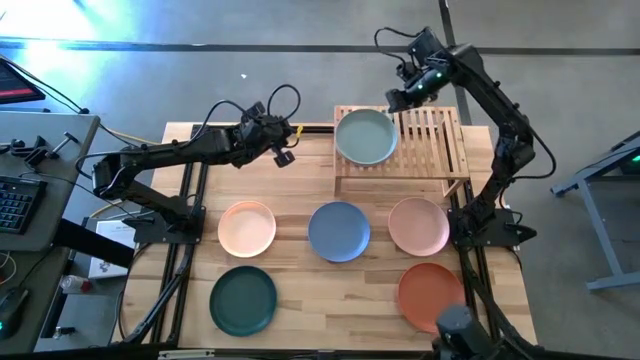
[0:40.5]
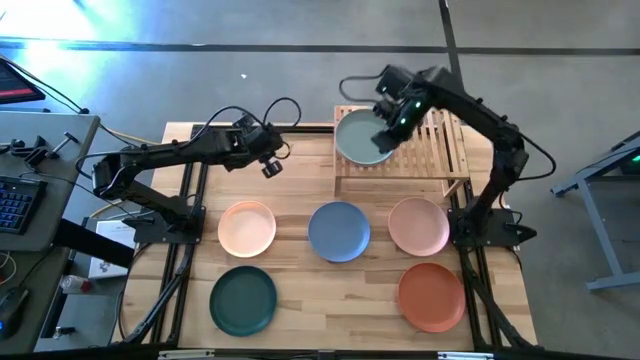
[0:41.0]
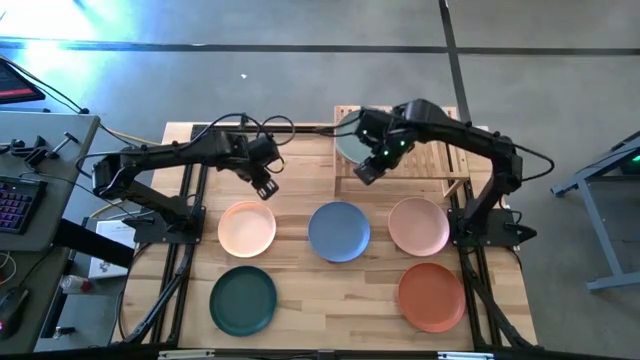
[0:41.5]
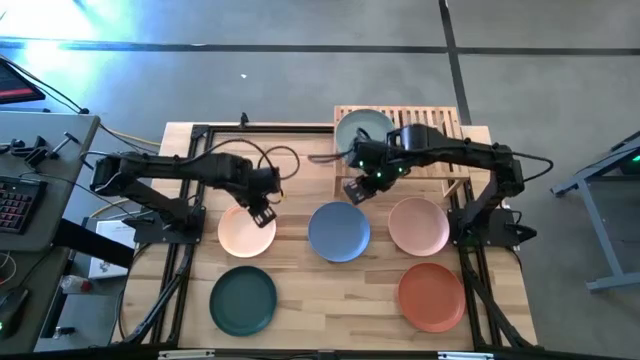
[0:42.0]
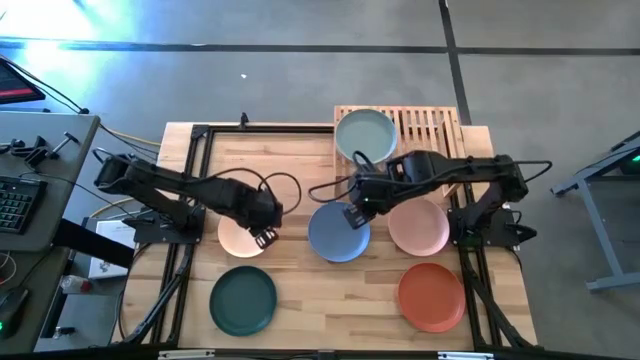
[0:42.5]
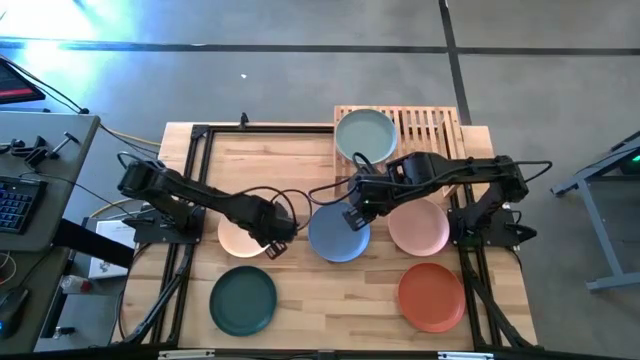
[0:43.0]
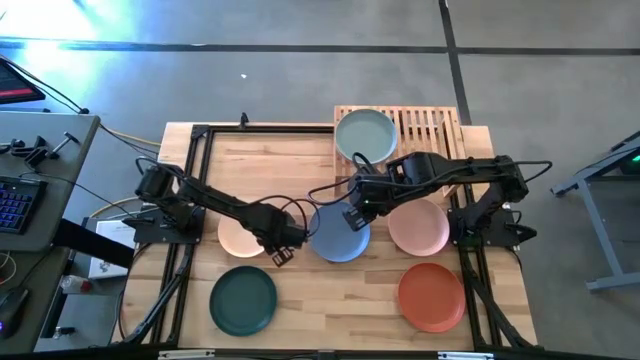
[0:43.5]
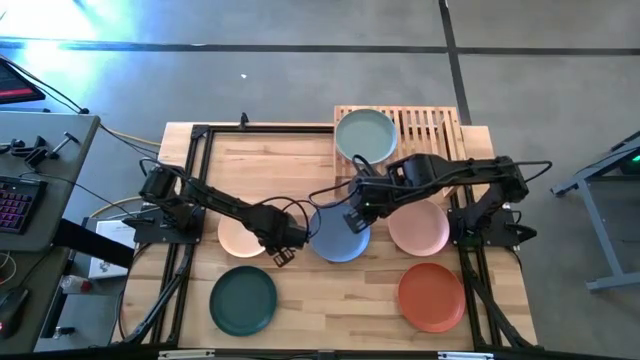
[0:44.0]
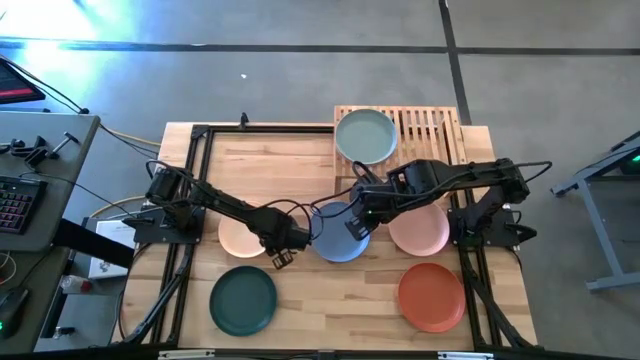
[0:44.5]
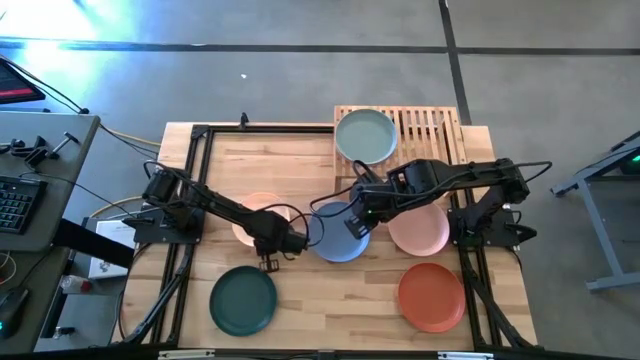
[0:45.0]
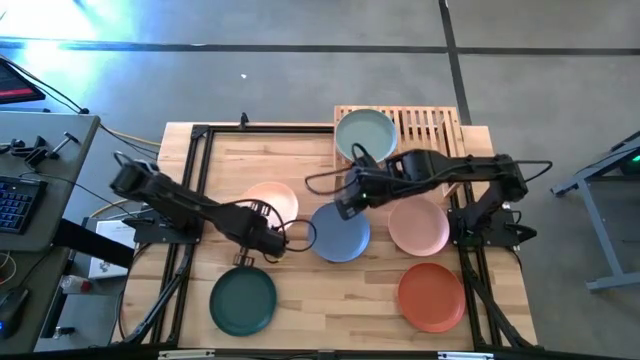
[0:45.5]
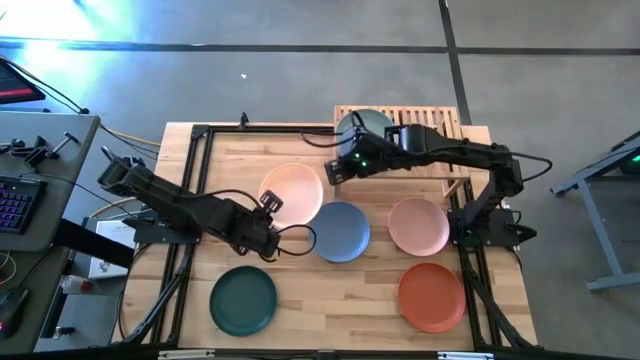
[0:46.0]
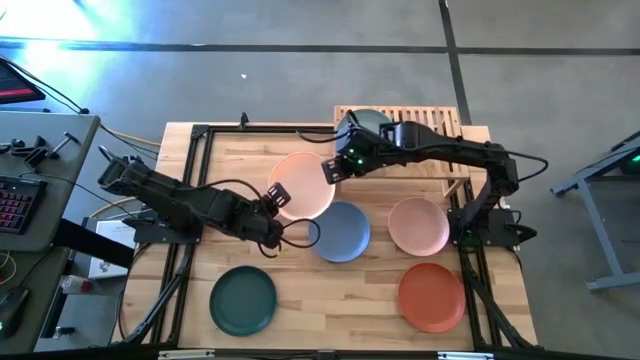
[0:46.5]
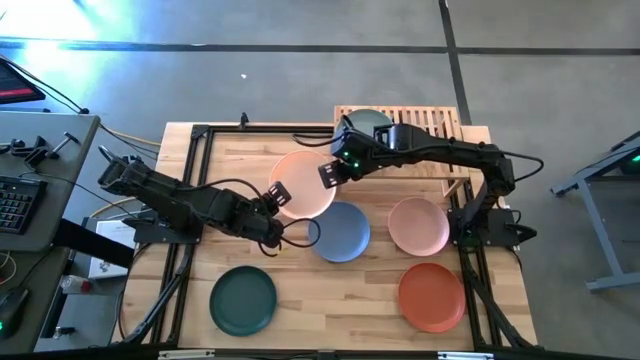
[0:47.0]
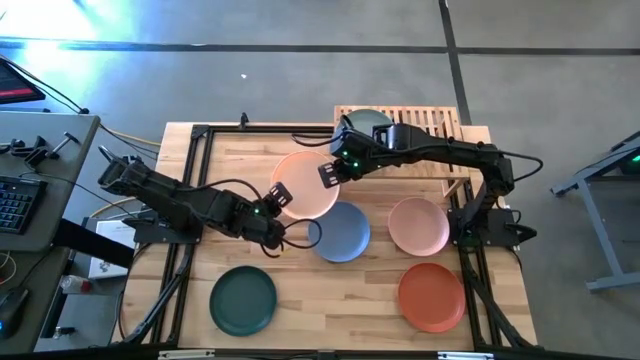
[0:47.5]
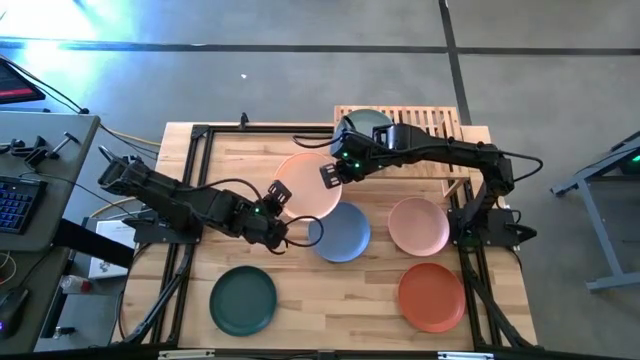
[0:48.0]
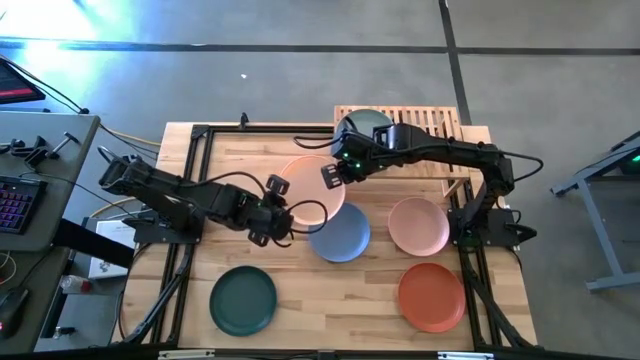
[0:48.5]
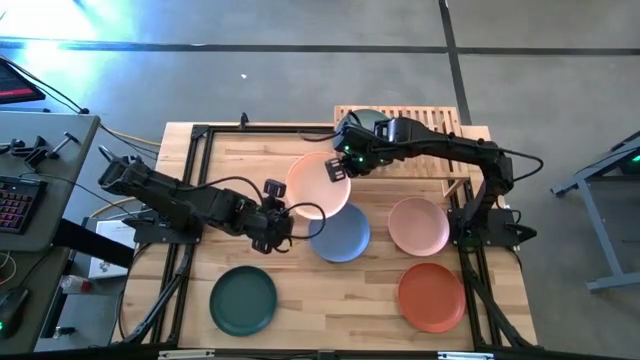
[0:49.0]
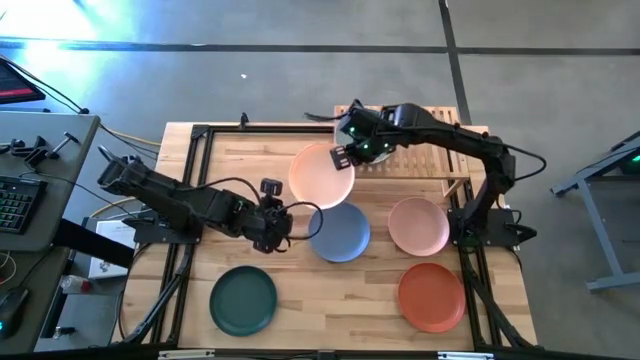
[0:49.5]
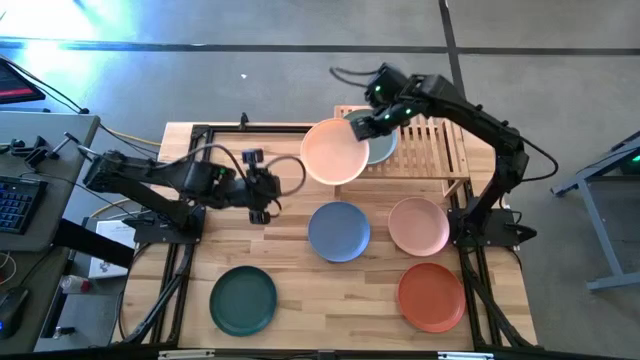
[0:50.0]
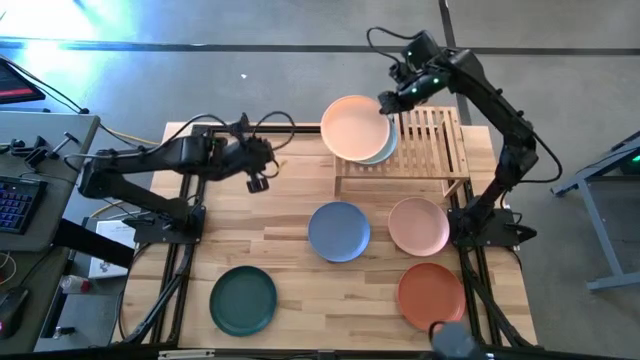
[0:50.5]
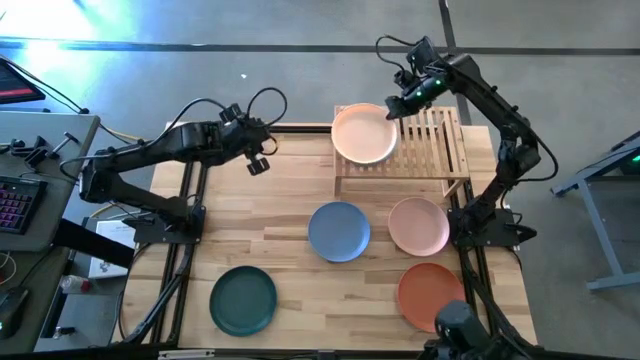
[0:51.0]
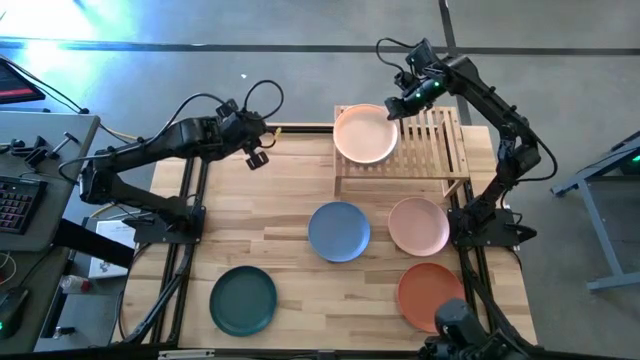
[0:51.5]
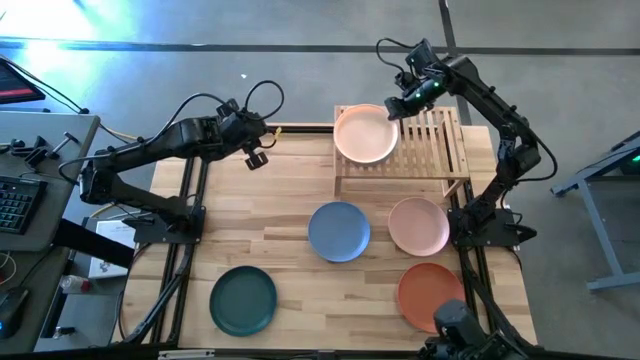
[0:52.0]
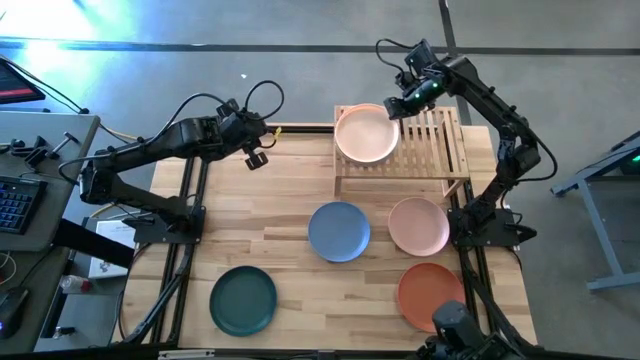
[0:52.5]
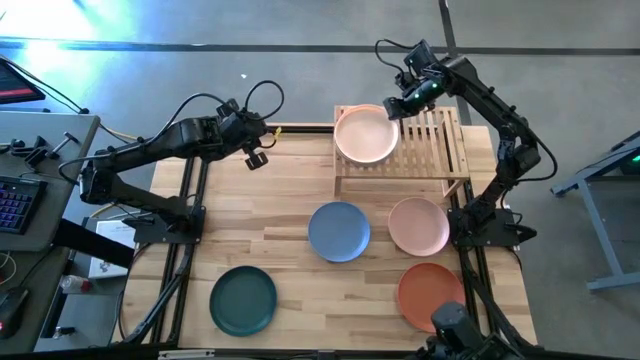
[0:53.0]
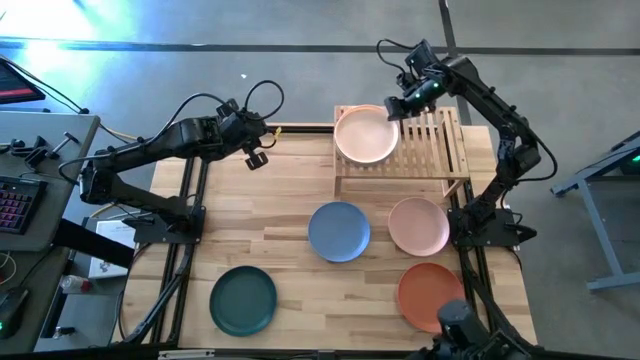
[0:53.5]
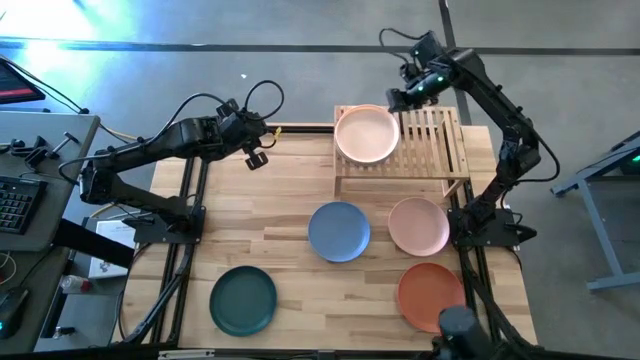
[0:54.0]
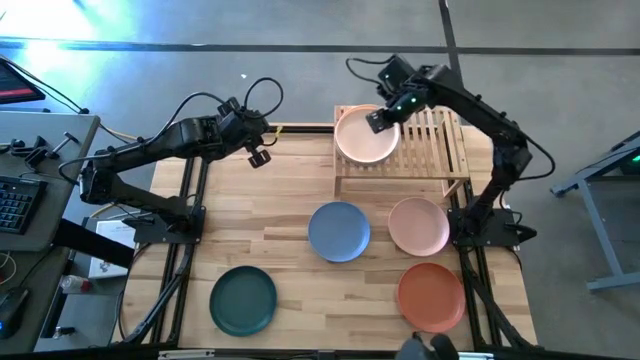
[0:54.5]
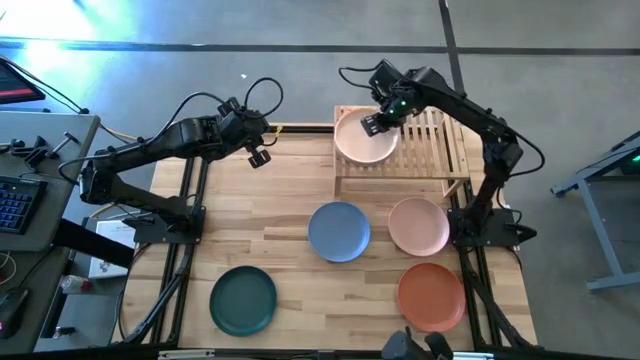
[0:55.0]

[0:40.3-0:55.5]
Task: Place and stack plates onto a shelf
Stack the light orange plate on top of the gray plate on the shelf

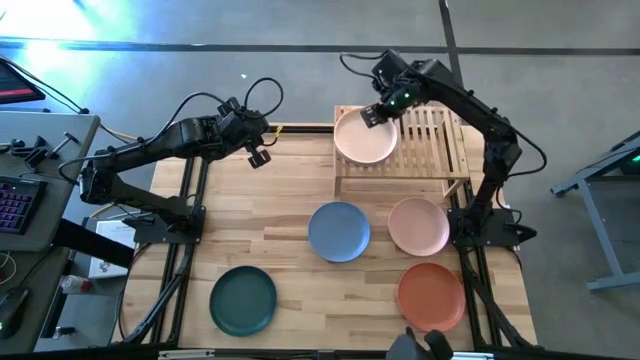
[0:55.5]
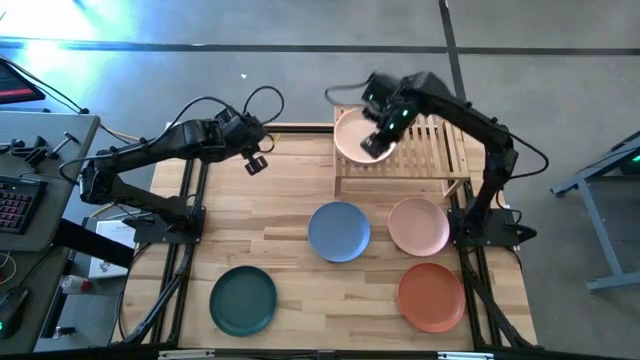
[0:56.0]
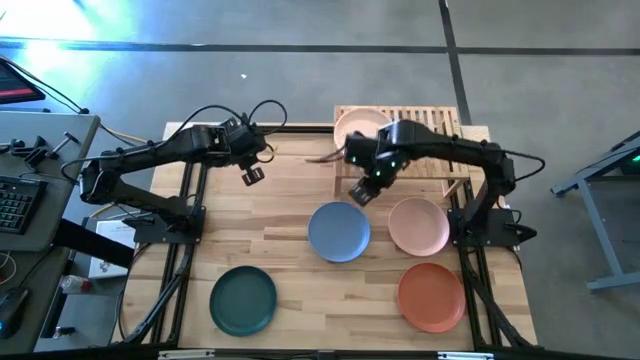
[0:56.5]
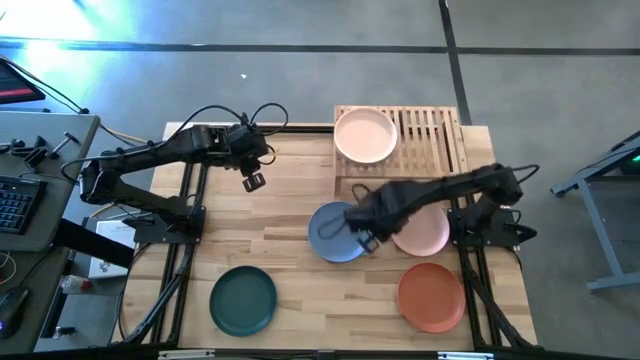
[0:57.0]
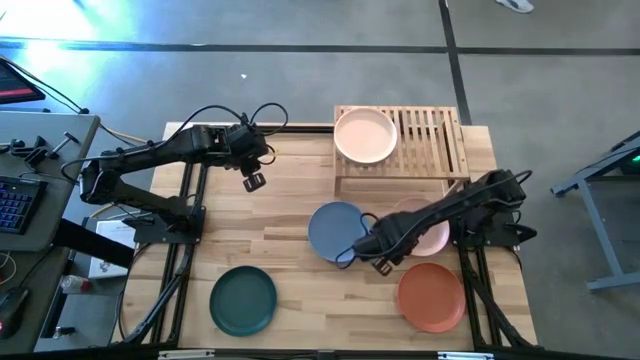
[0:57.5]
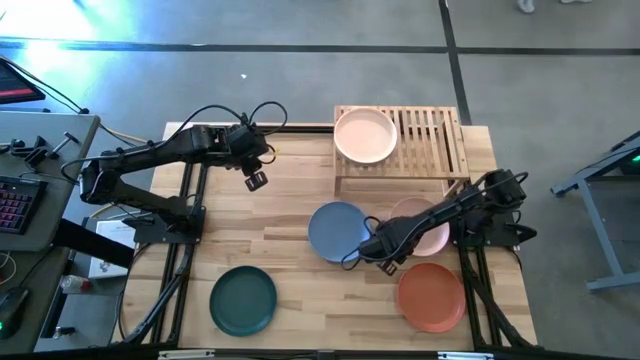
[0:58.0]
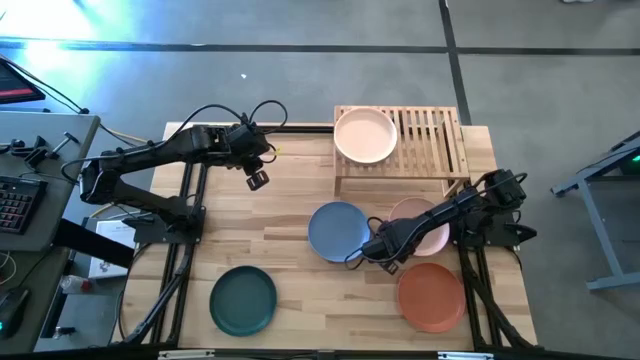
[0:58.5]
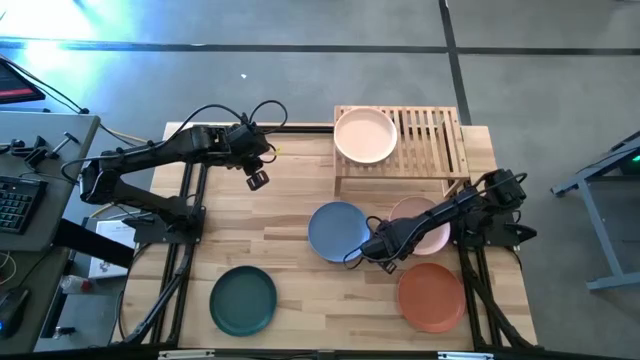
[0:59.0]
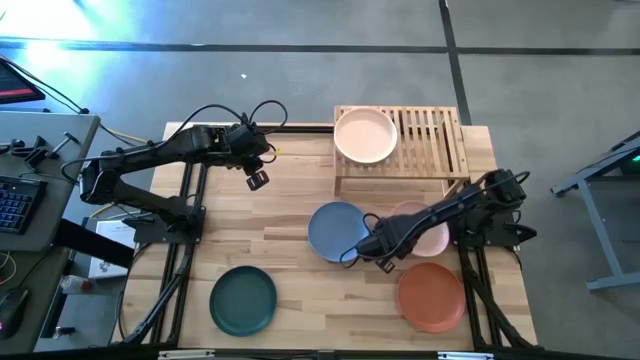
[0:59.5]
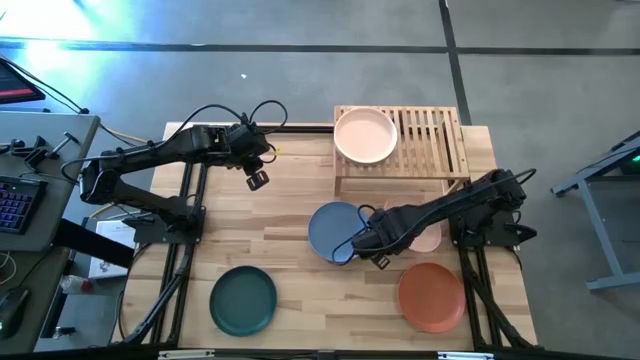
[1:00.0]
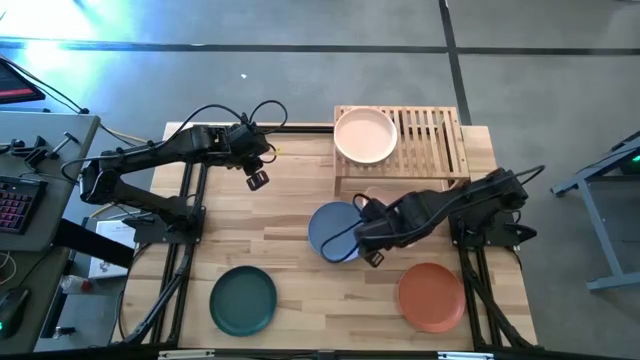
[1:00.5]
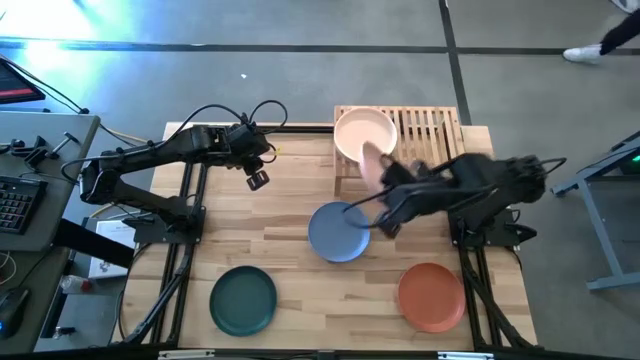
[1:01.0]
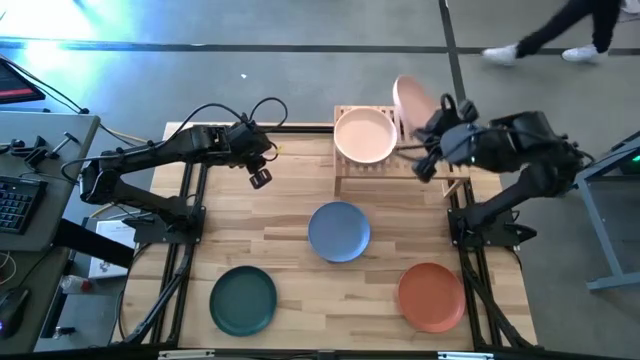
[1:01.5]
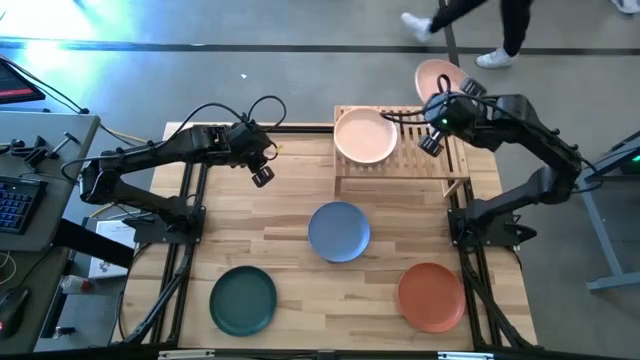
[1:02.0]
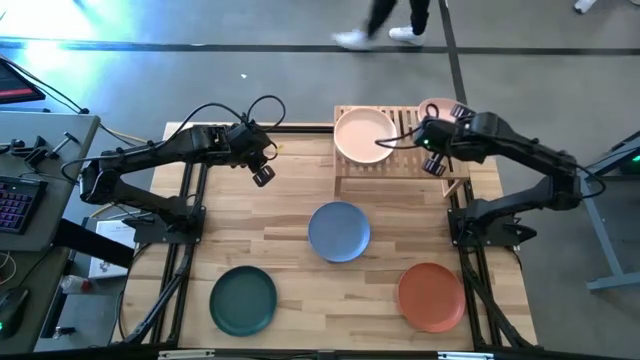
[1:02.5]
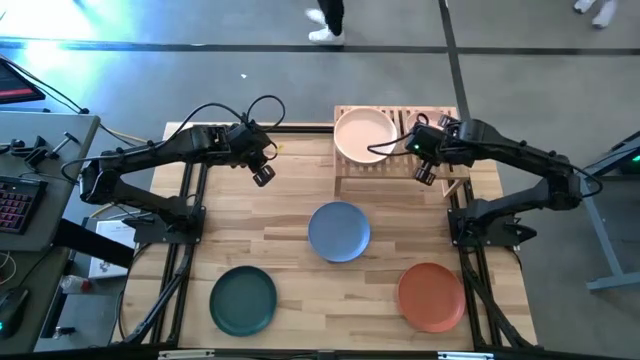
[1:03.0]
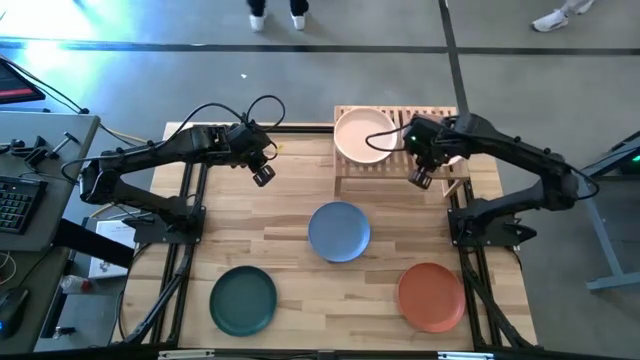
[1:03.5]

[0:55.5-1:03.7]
Put the pink plate on the the shelf
